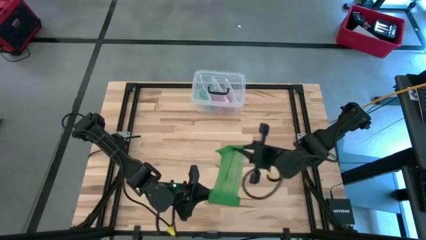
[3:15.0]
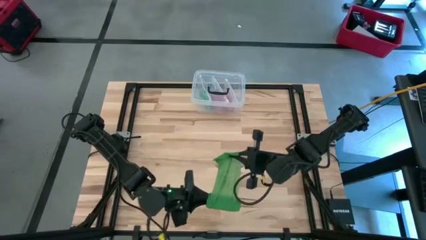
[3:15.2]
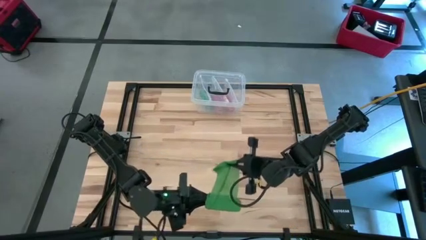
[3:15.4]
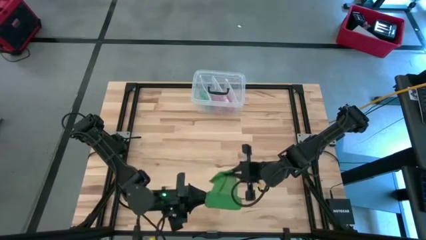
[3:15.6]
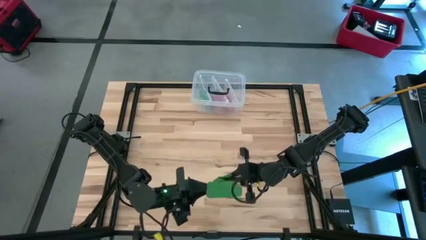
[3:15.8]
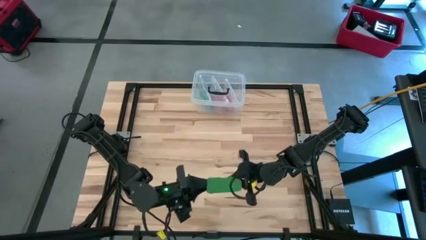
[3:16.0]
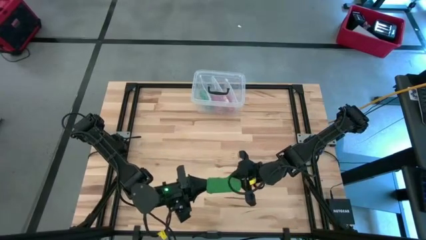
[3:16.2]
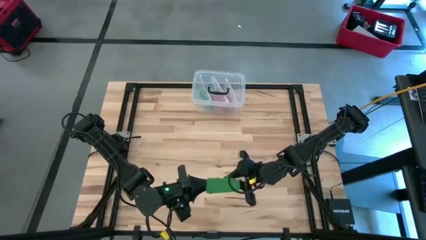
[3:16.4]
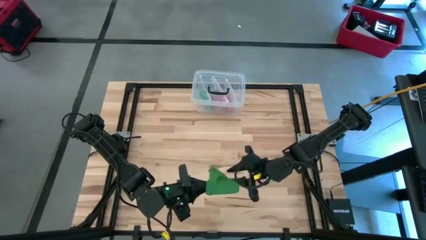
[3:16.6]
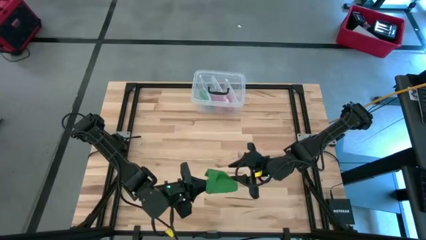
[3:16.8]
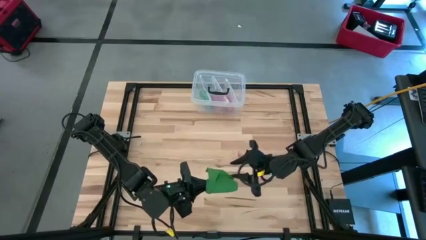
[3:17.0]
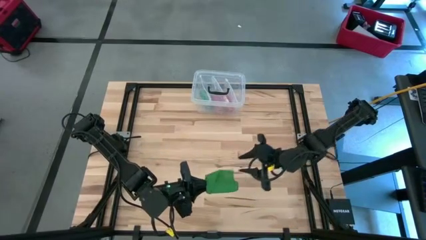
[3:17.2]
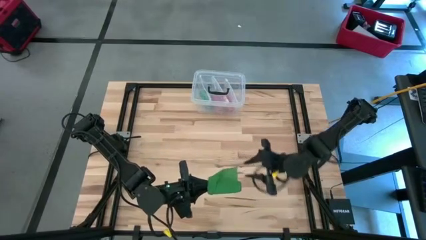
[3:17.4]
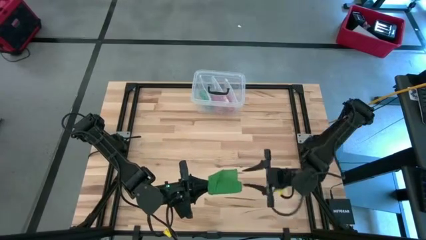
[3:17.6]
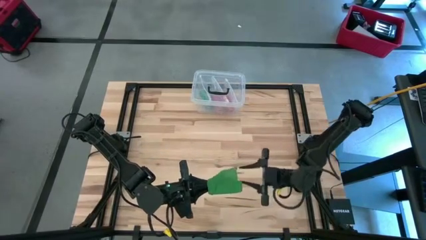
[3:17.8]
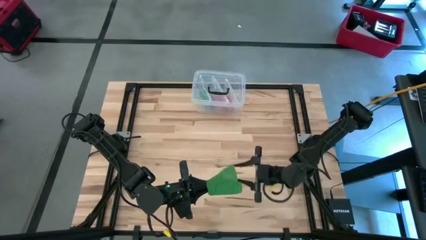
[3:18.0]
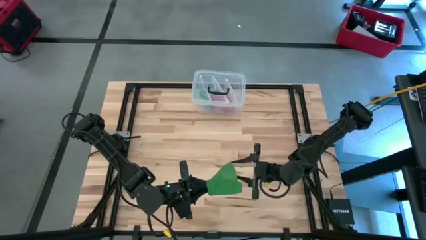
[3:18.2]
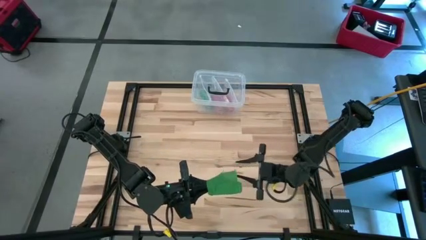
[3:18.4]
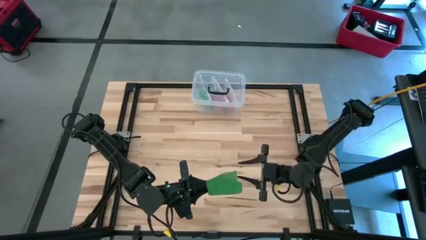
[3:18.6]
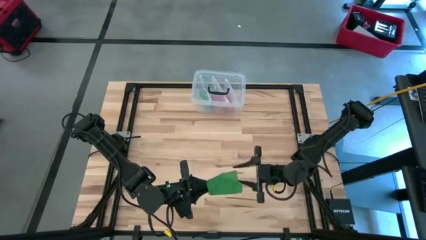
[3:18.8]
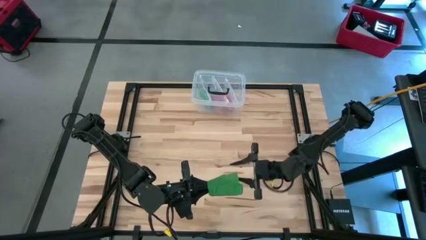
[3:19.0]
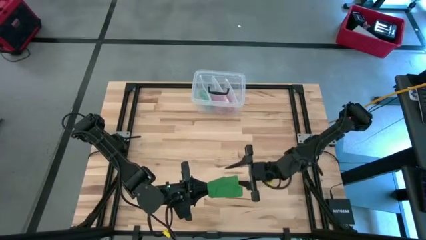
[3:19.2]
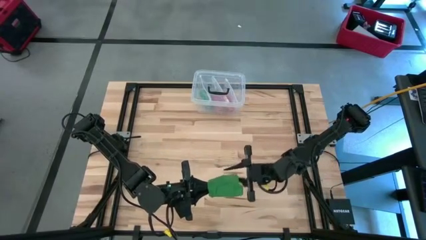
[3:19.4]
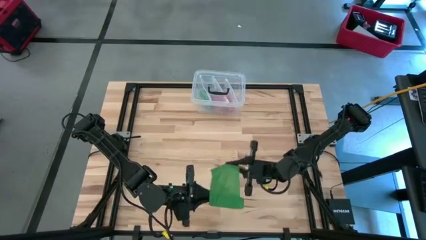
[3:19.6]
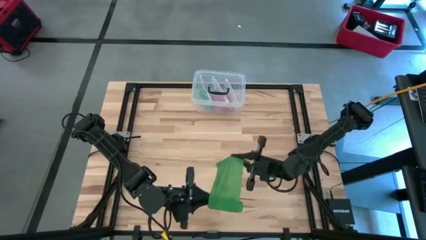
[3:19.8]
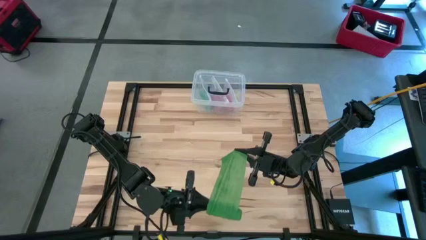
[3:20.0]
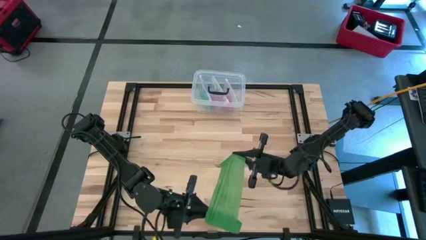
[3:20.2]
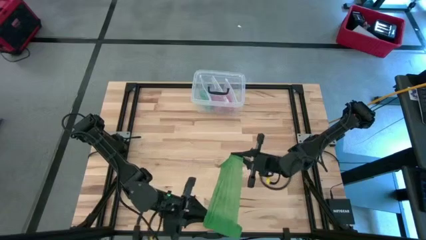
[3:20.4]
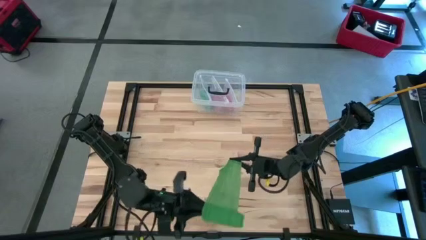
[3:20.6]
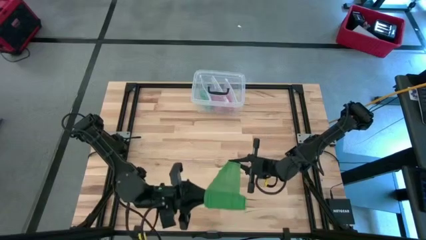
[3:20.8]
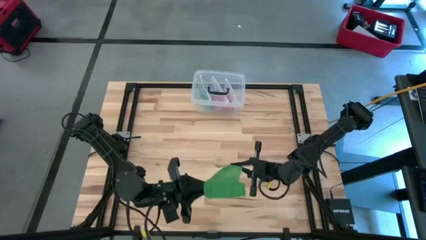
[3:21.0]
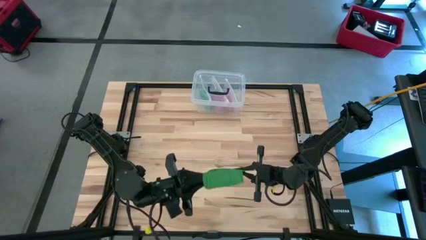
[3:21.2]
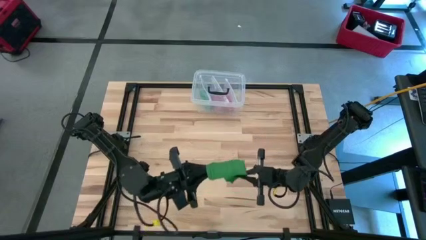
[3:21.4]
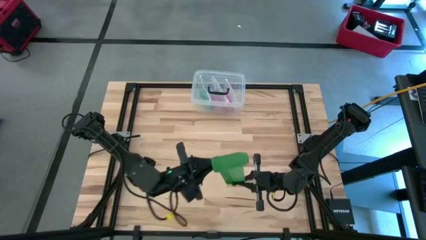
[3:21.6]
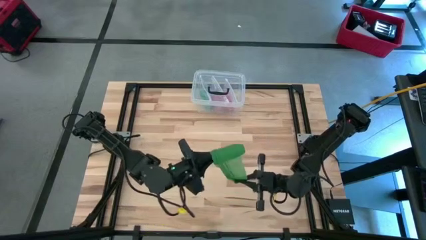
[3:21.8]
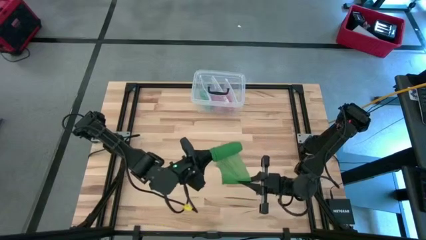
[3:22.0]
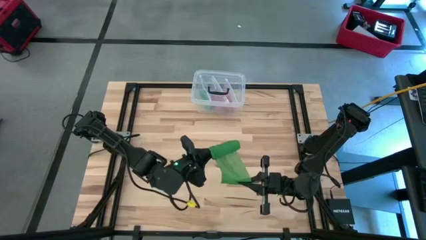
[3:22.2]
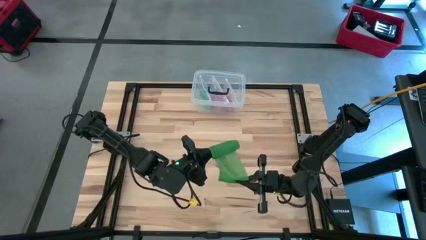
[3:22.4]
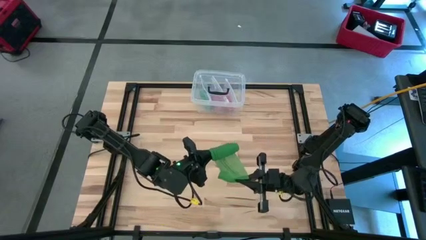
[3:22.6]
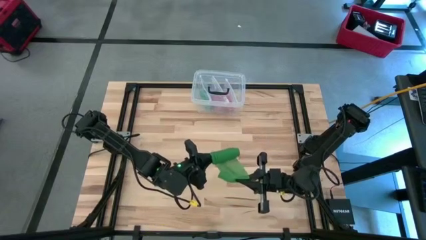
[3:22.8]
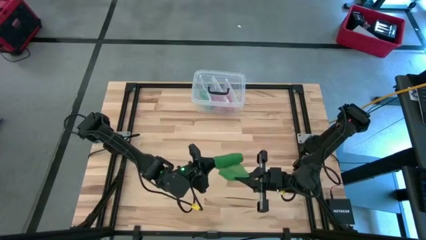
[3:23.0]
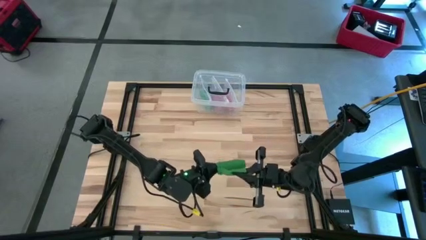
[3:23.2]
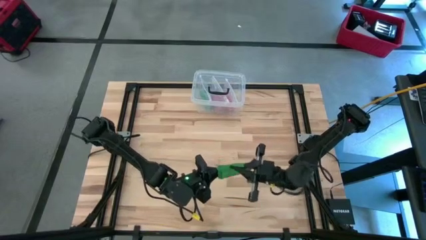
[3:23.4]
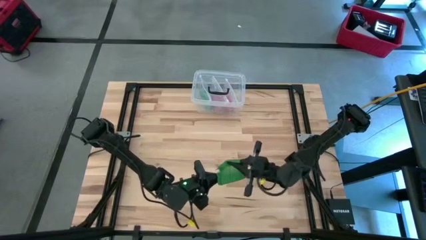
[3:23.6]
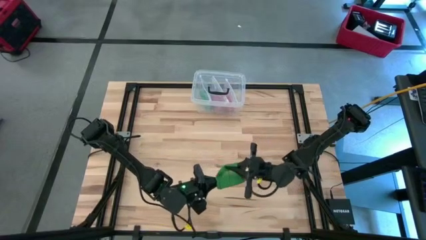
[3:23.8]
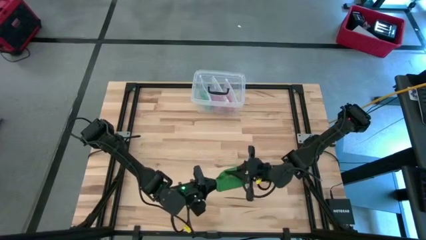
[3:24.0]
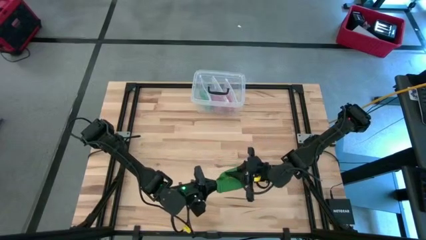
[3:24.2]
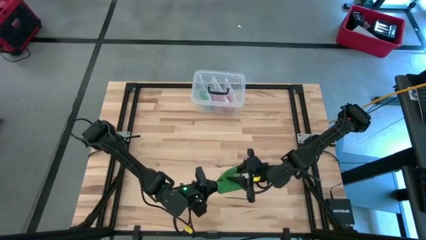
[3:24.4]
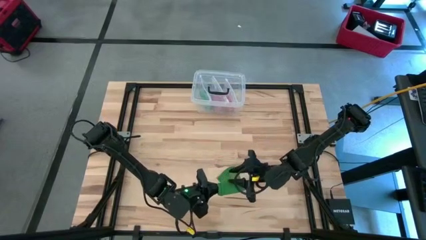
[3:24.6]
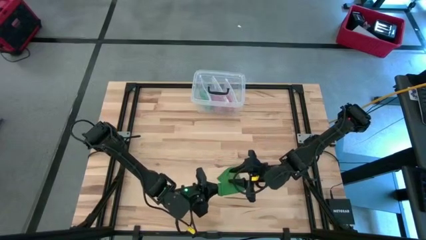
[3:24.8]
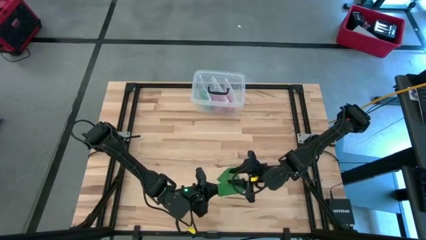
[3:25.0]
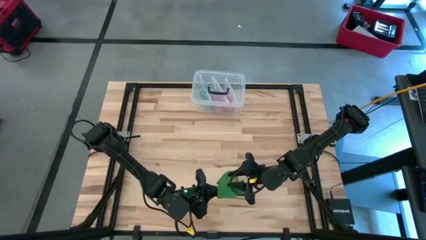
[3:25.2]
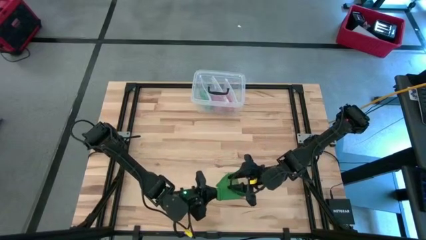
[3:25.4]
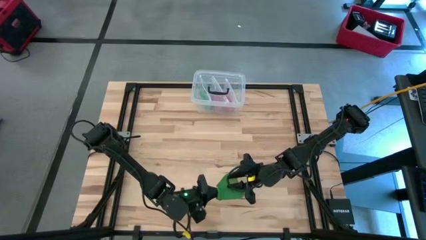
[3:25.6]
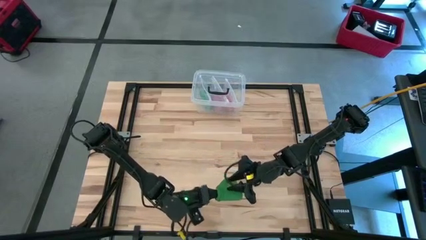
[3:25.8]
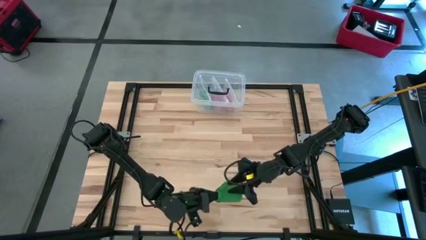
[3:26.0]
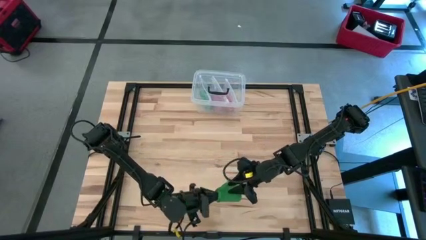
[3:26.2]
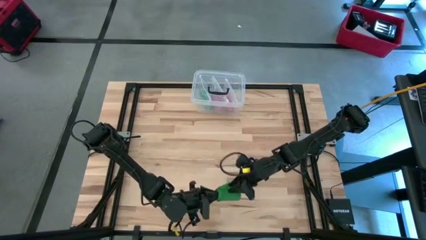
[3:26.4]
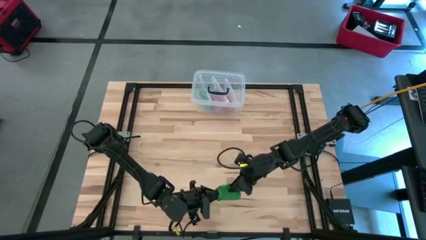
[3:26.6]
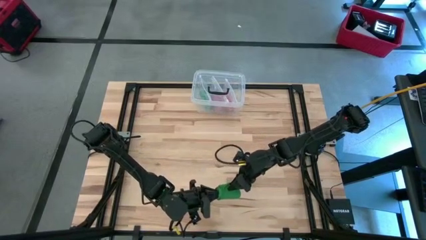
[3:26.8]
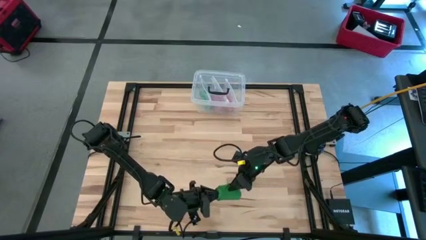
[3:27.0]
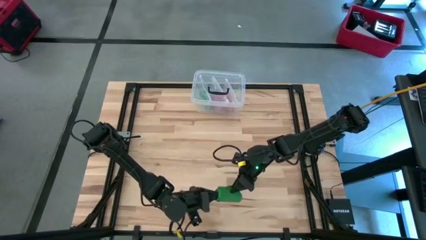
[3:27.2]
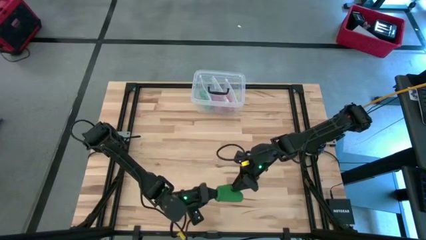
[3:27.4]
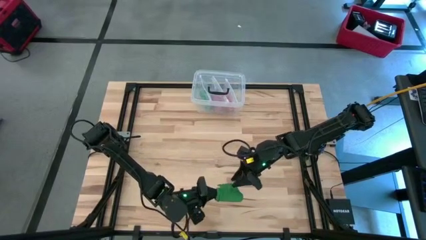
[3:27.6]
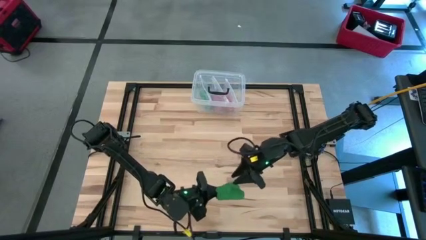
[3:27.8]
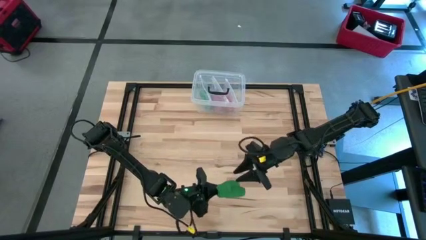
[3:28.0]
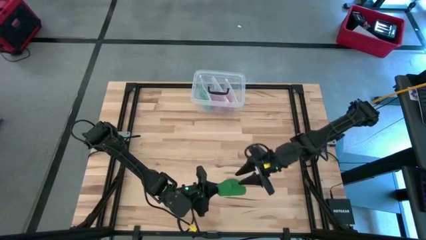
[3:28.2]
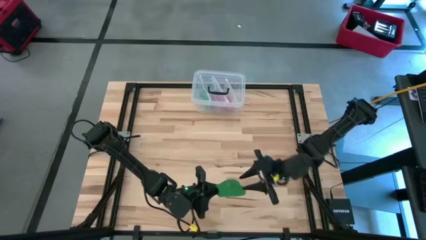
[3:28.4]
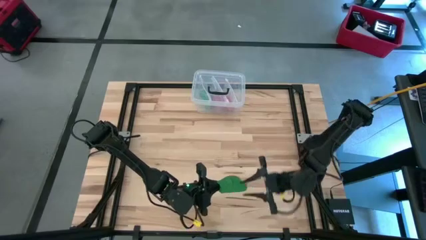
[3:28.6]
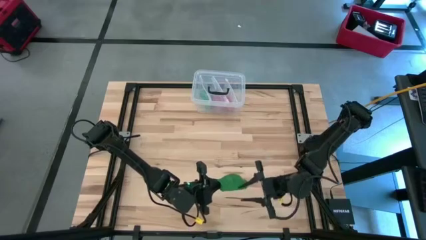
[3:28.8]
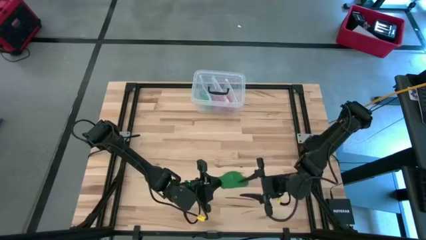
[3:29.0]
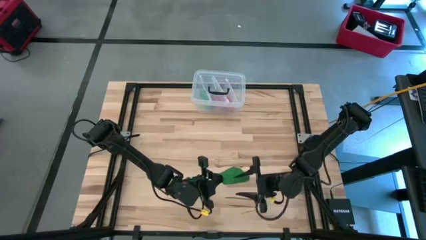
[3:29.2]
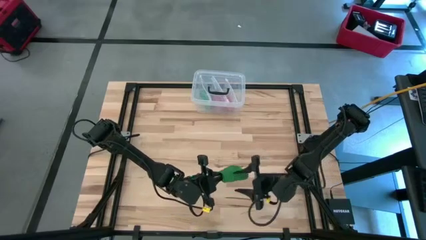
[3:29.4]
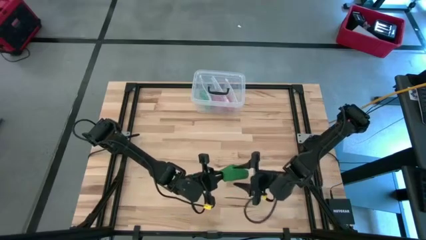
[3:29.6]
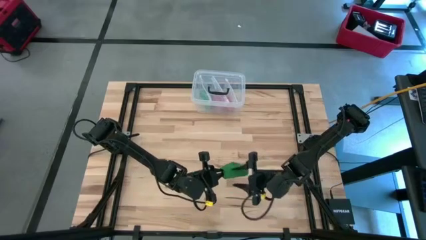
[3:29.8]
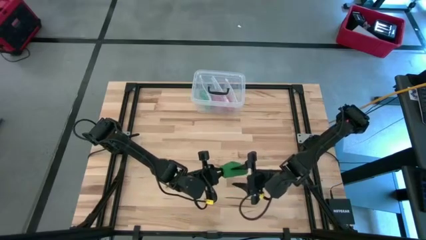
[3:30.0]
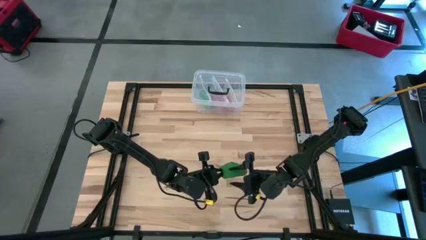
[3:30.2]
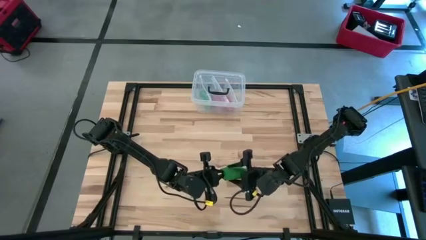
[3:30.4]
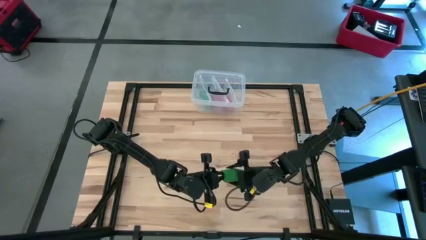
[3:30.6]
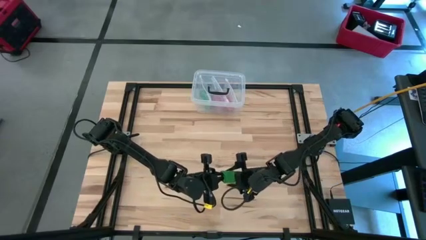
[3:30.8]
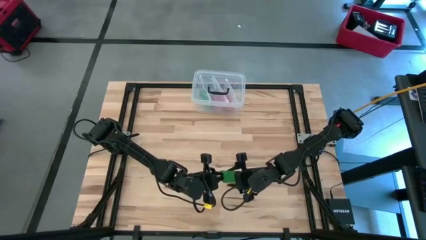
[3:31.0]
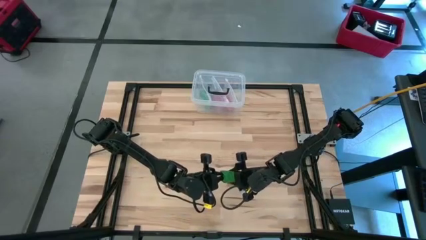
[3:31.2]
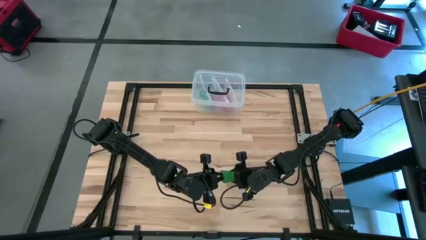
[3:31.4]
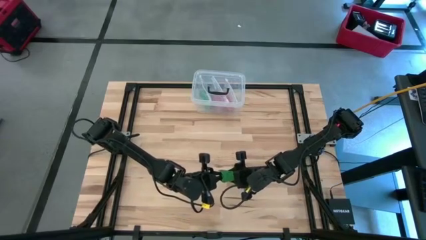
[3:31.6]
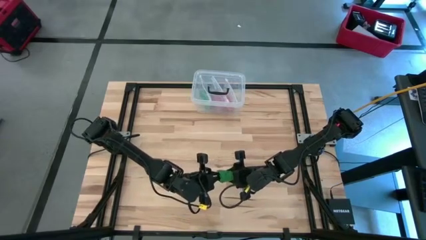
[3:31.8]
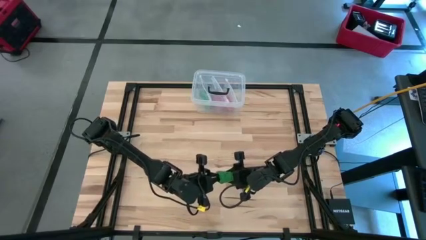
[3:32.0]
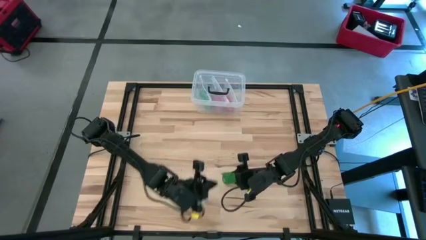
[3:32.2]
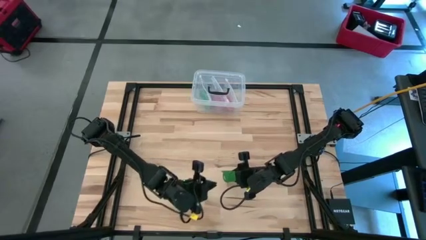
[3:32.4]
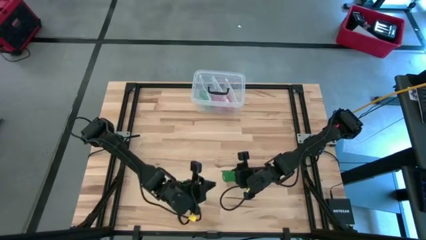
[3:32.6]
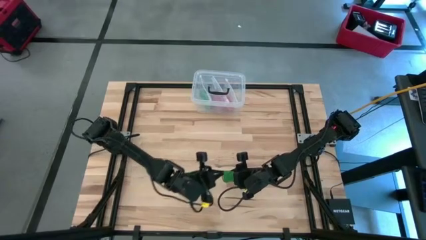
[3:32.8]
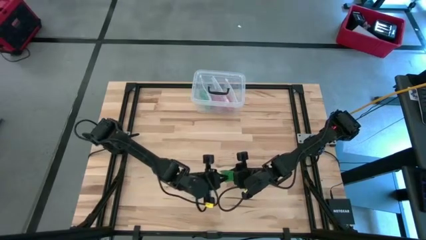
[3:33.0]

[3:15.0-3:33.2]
Task: Roll bandage
Roll the green bandage
